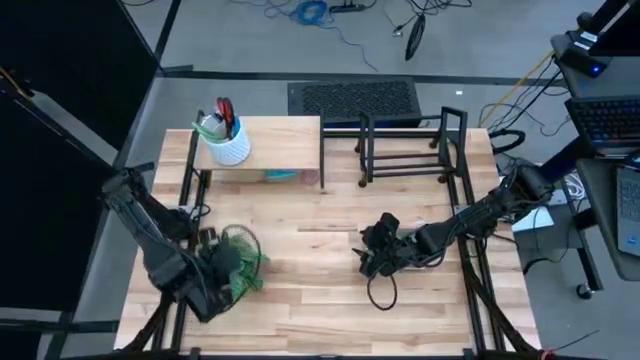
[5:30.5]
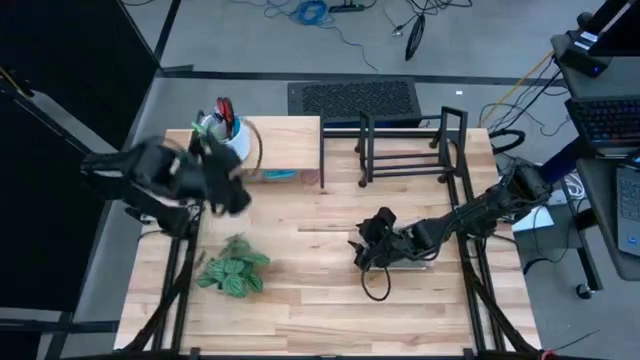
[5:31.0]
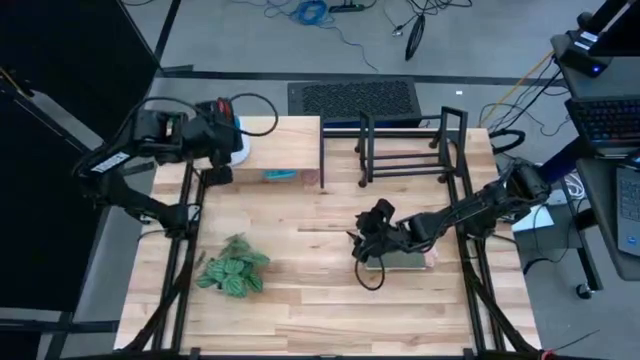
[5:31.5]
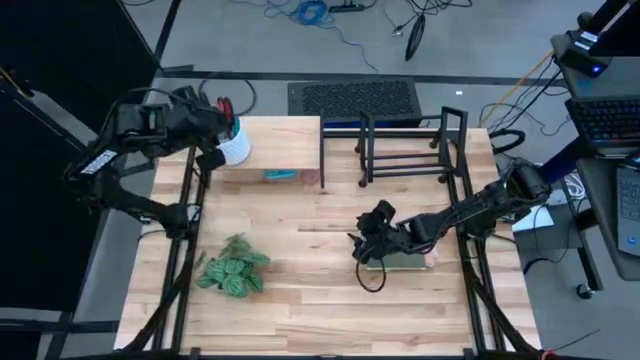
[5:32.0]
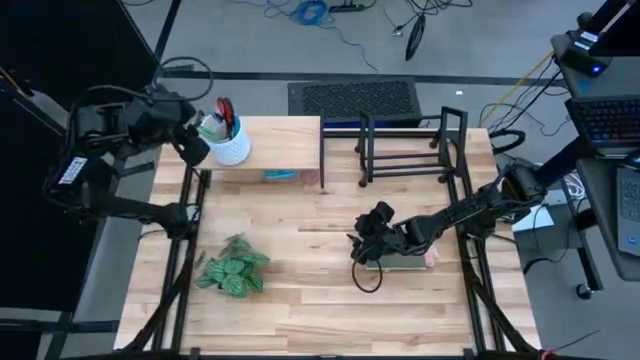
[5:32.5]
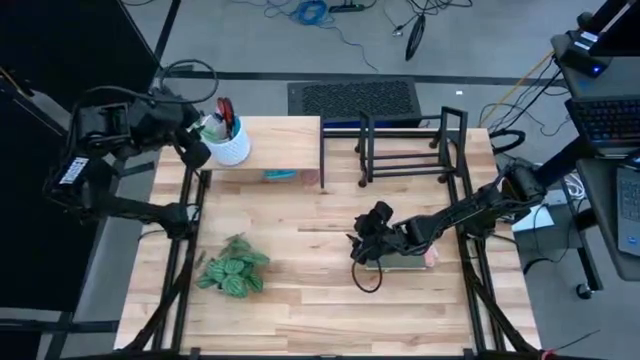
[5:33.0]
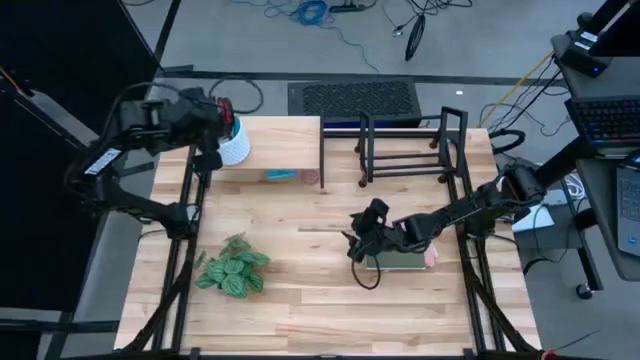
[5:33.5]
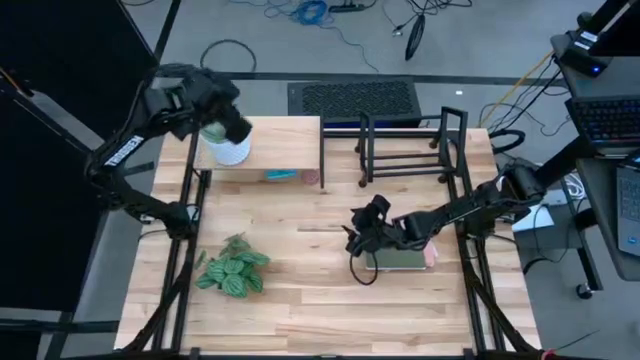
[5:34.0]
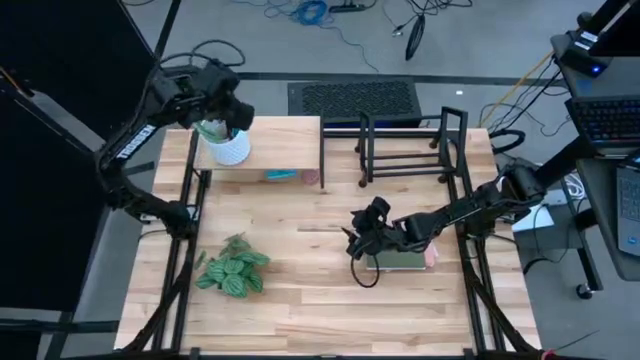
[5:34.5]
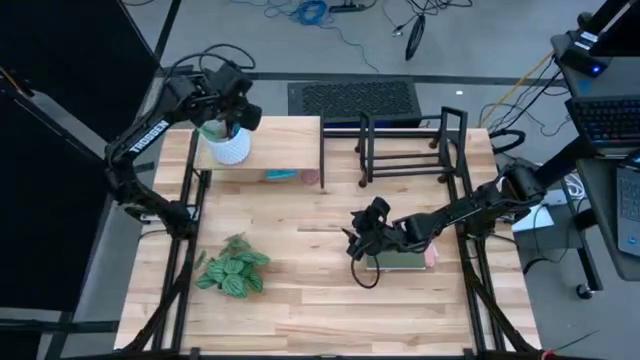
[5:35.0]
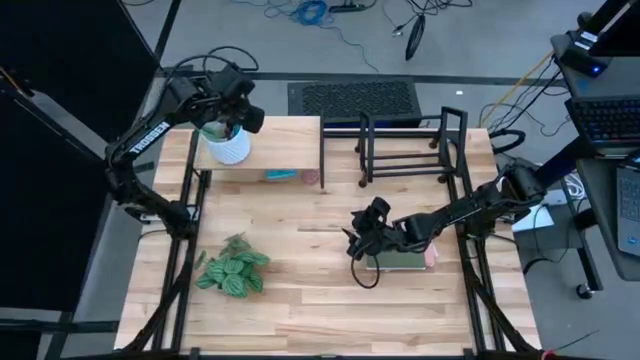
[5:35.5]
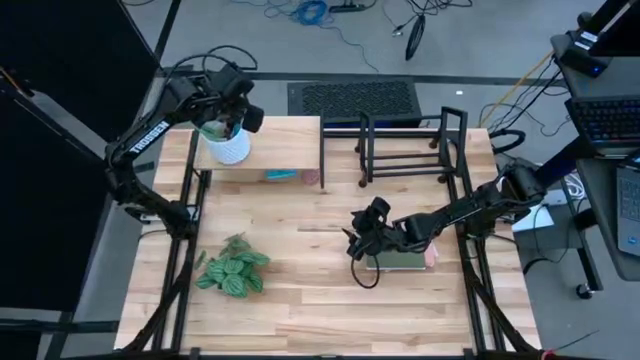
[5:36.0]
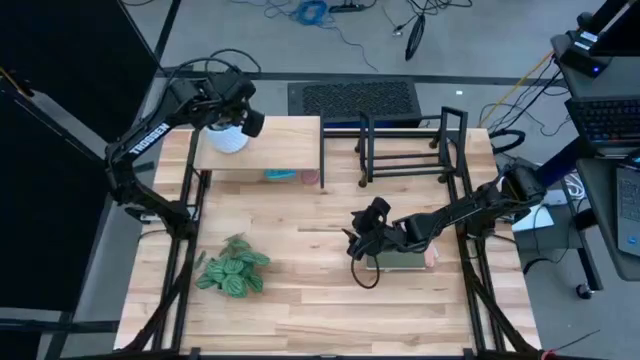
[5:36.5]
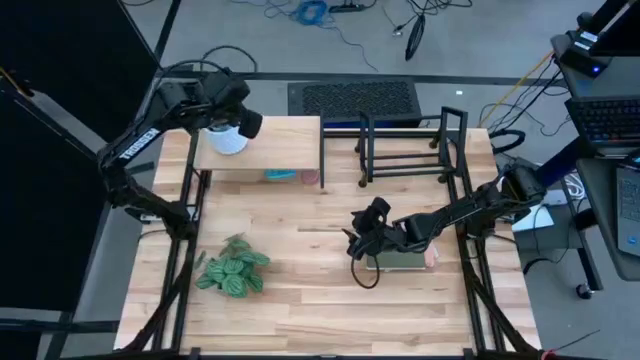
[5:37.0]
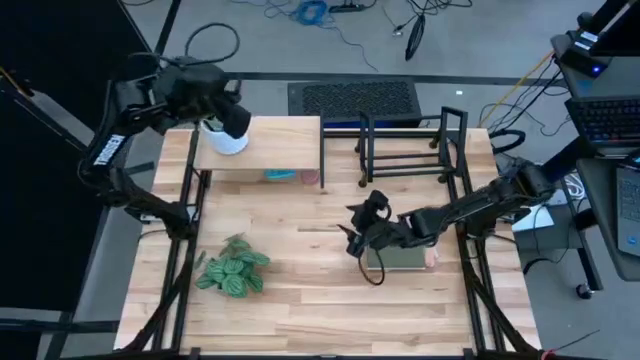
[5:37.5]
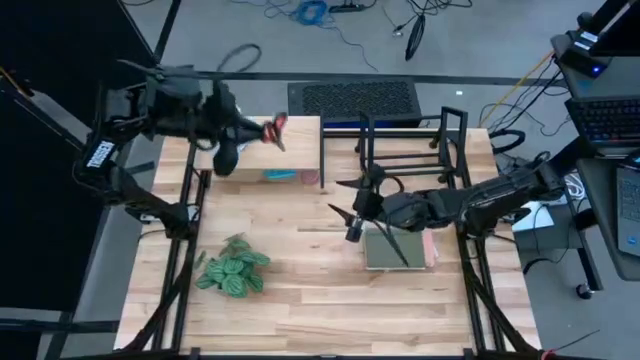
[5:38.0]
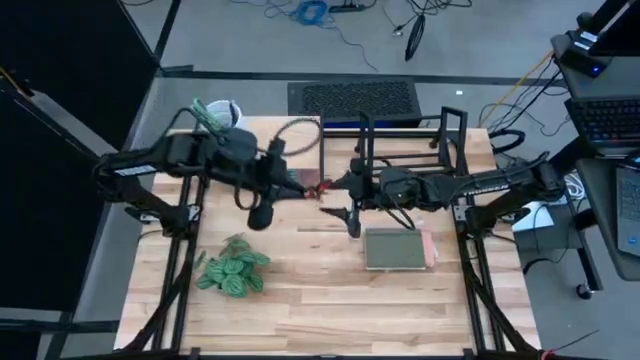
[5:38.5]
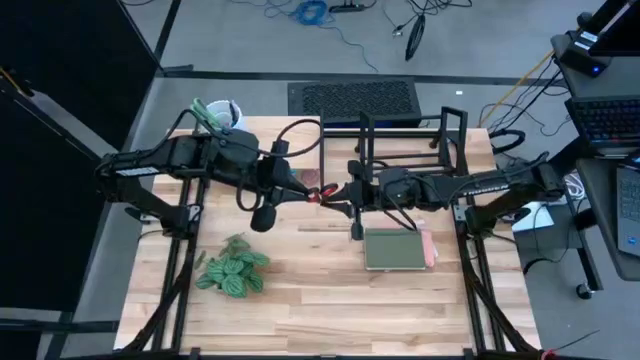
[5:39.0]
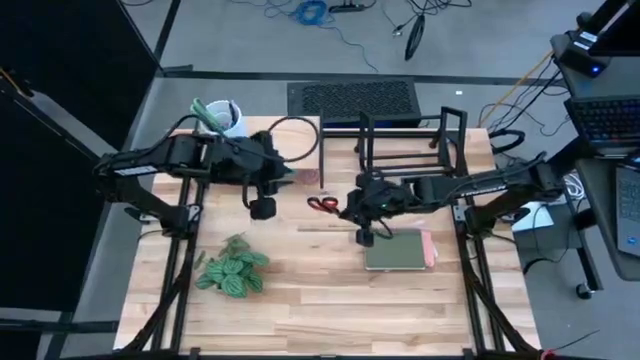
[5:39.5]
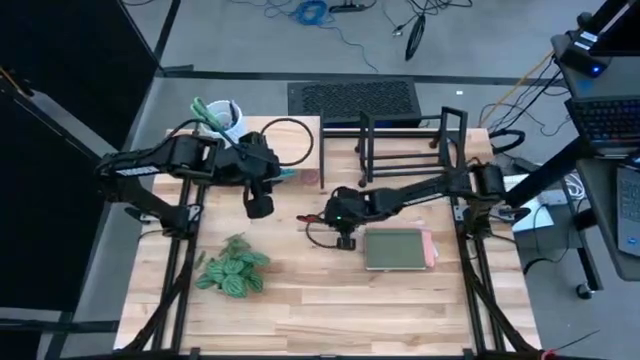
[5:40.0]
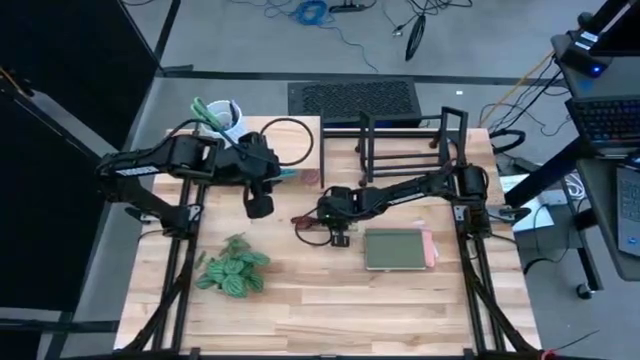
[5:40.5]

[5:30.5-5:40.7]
Task: Stock shelves
Remove the black scissors from the white pen holder

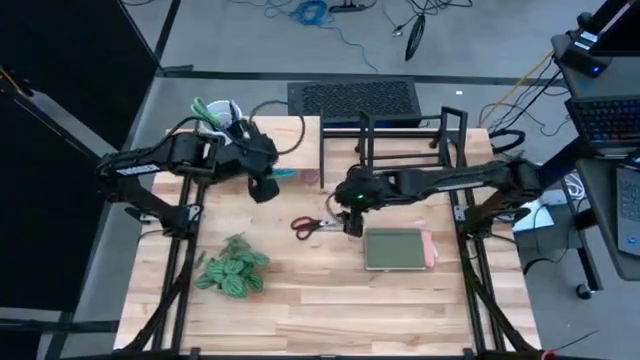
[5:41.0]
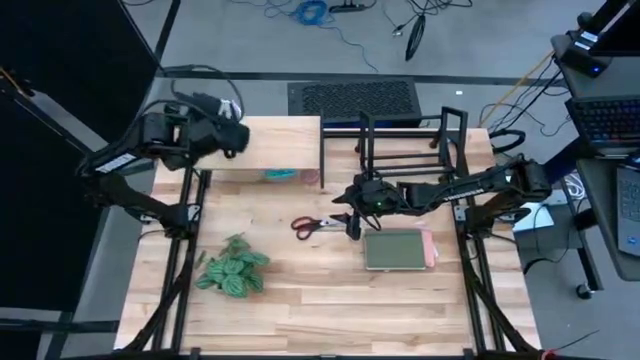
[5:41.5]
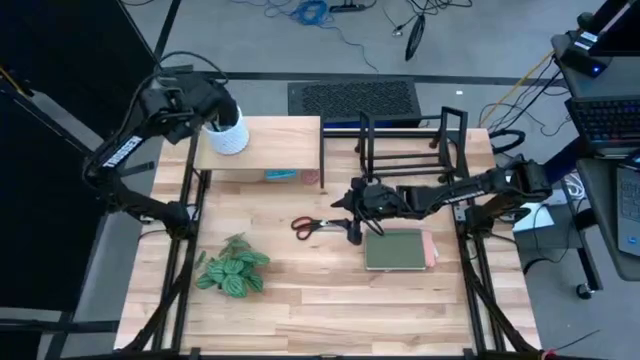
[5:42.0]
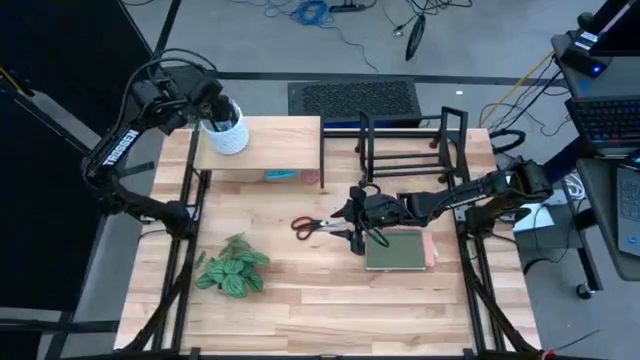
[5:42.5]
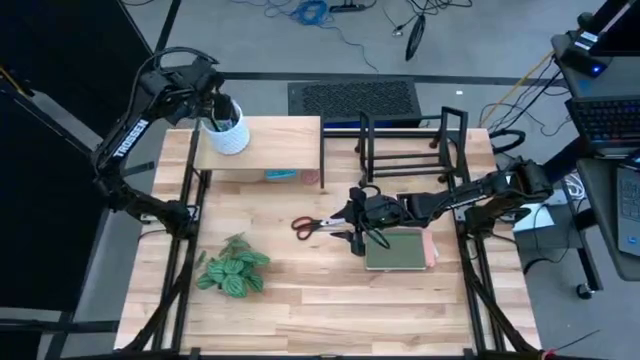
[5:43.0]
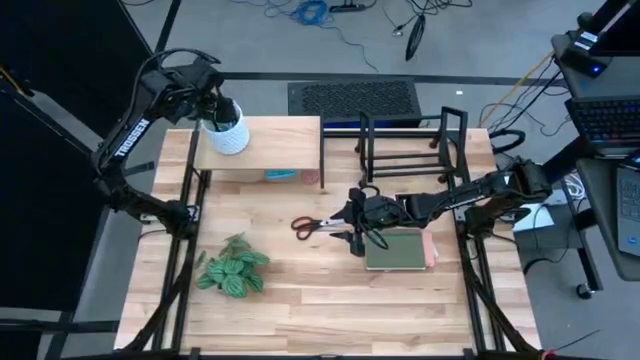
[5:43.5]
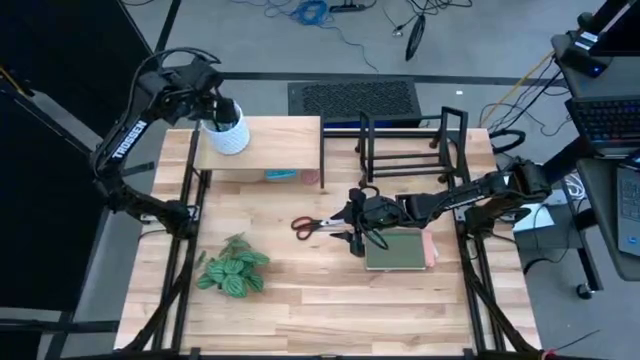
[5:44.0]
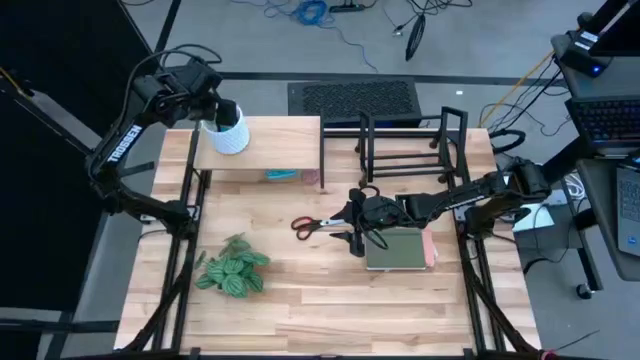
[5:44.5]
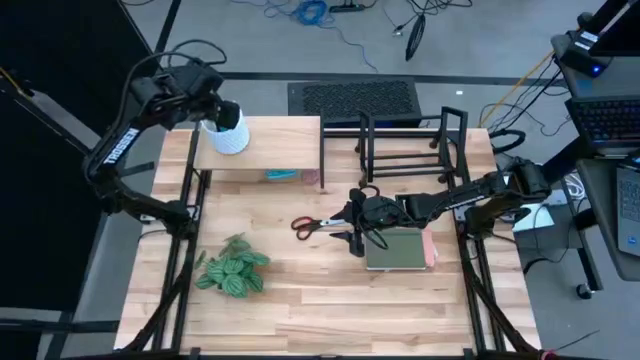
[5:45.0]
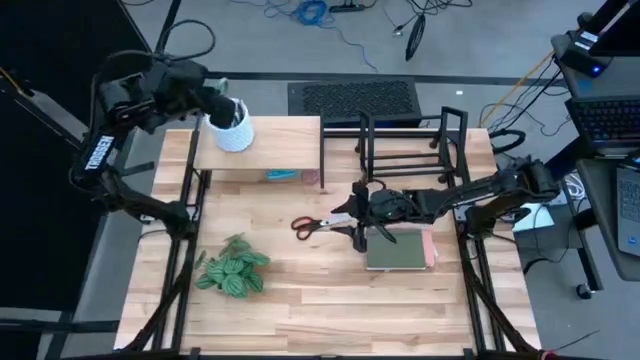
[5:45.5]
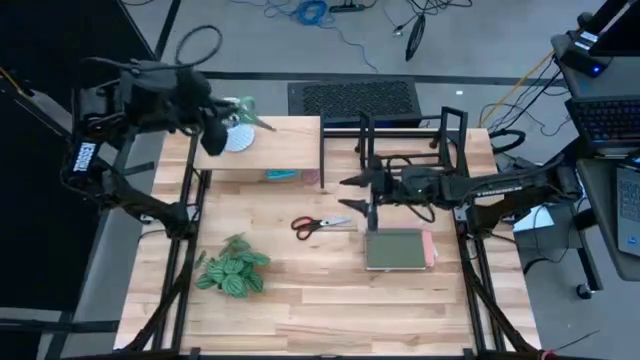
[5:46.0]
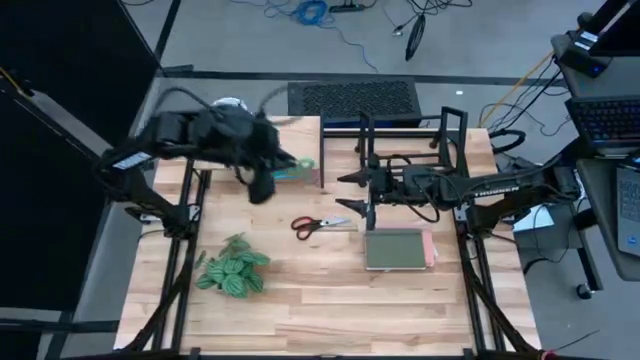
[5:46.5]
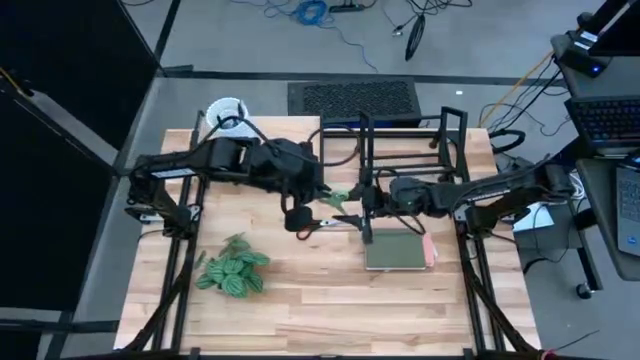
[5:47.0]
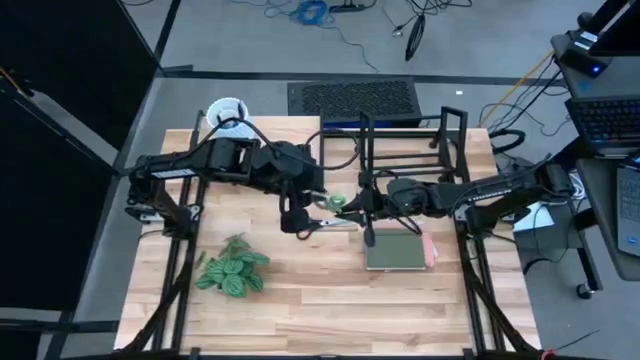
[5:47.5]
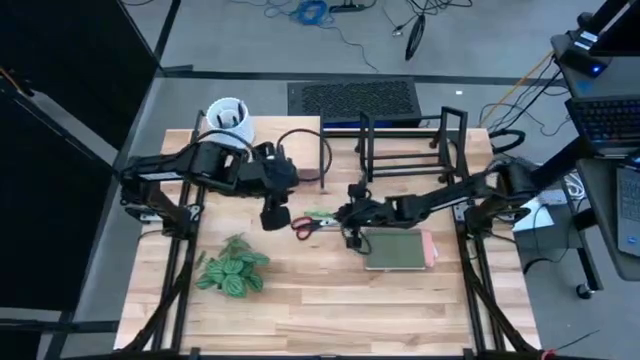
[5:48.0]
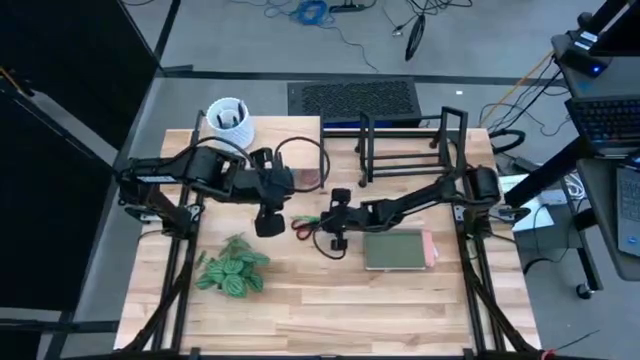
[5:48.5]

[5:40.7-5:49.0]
Remove the green scissors from the white pen holder

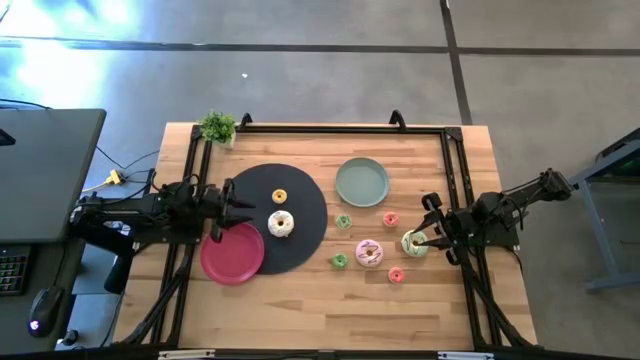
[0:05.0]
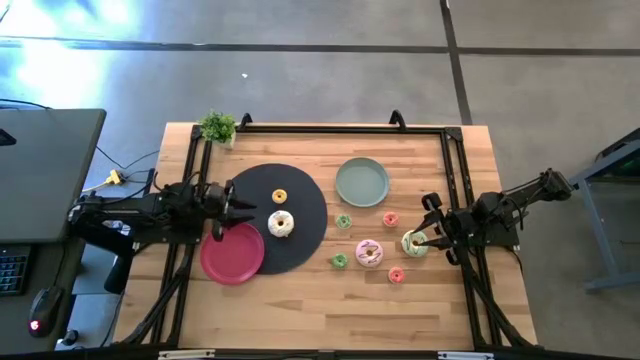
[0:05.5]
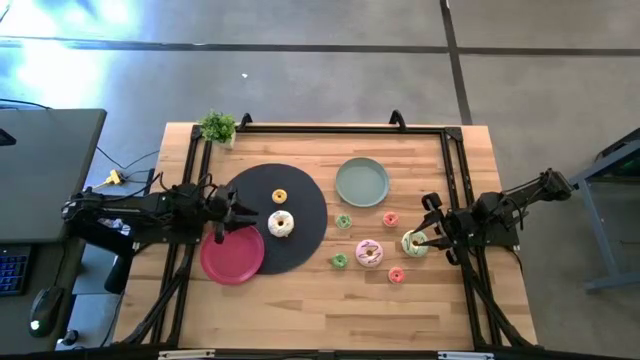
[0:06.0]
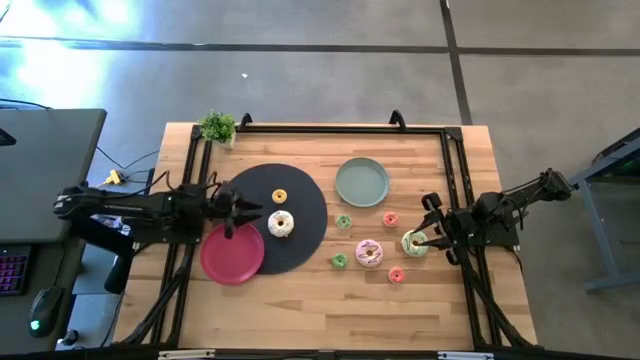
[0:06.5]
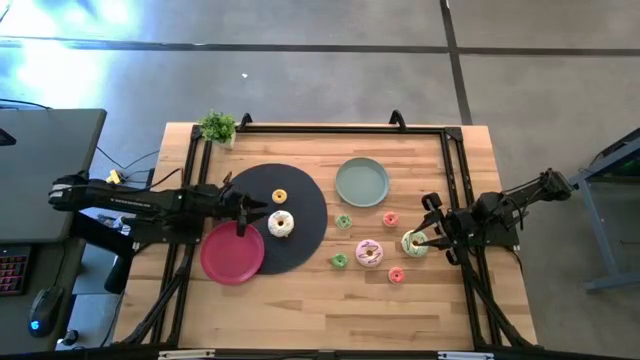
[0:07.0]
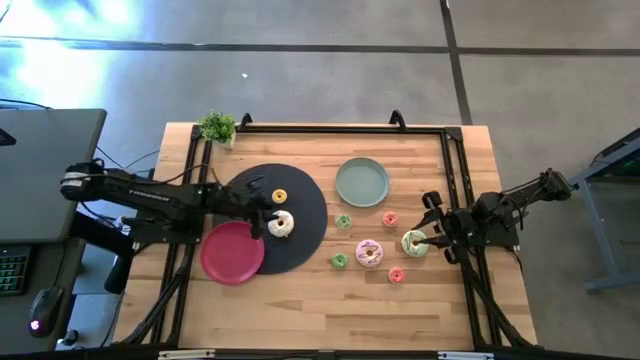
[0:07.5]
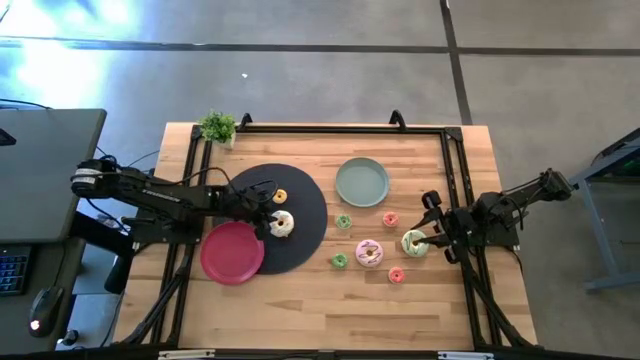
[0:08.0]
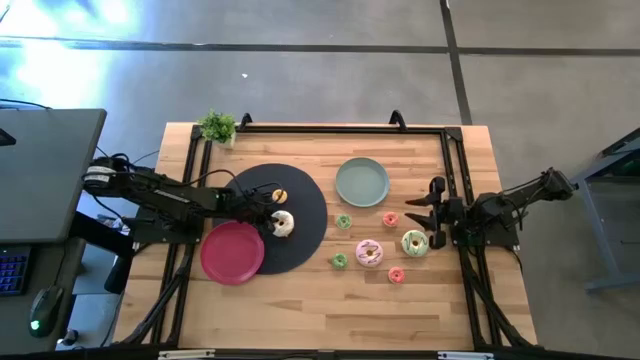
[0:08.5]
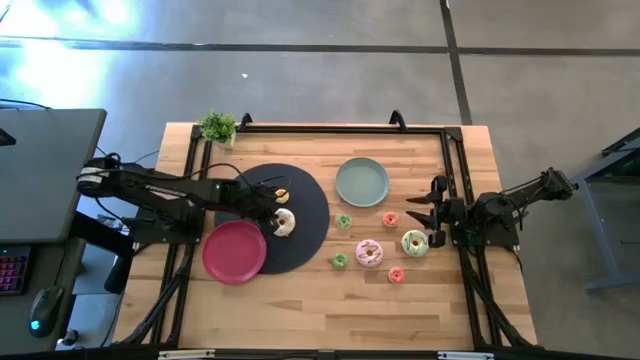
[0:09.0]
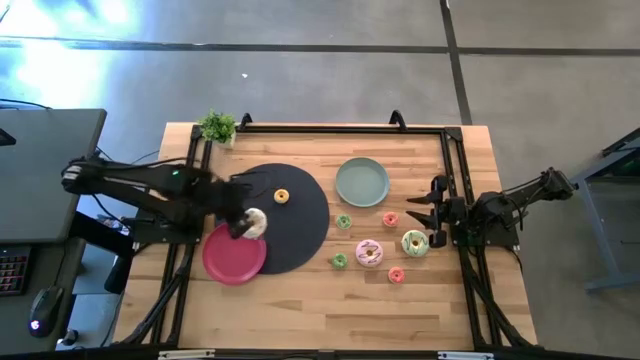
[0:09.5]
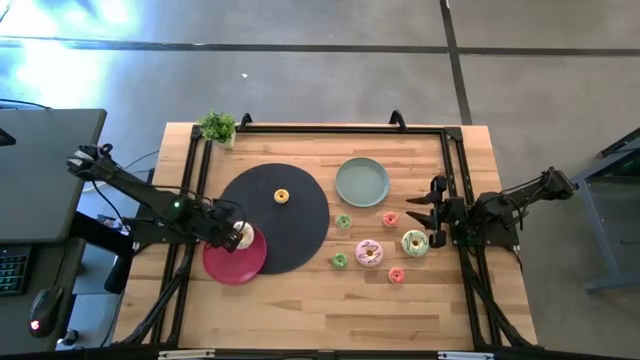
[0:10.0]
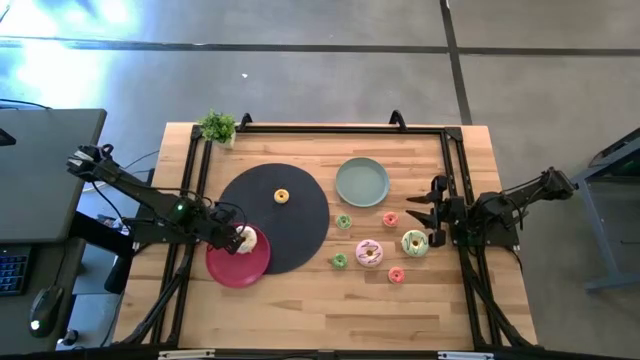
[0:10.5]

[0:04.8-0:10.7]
Task: Pick & Place donuts
Put the big white donut on the red plate
